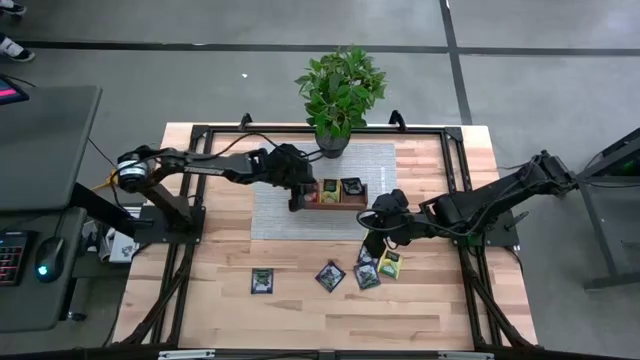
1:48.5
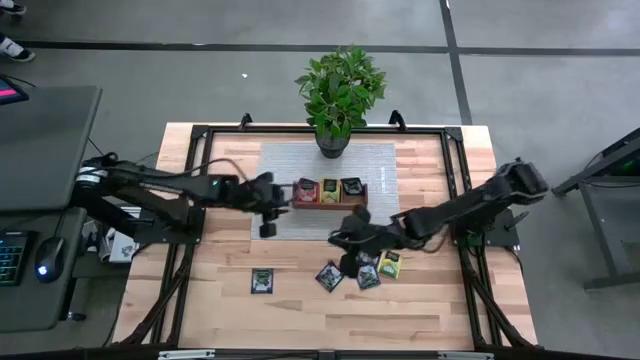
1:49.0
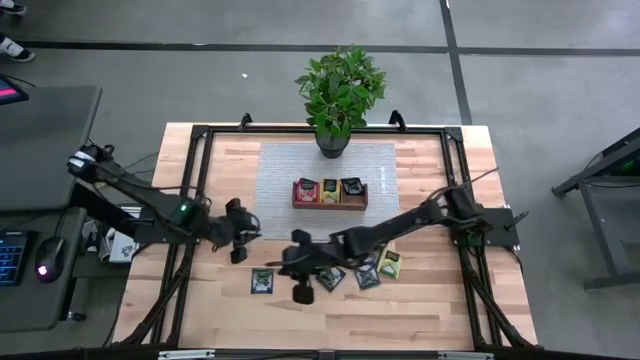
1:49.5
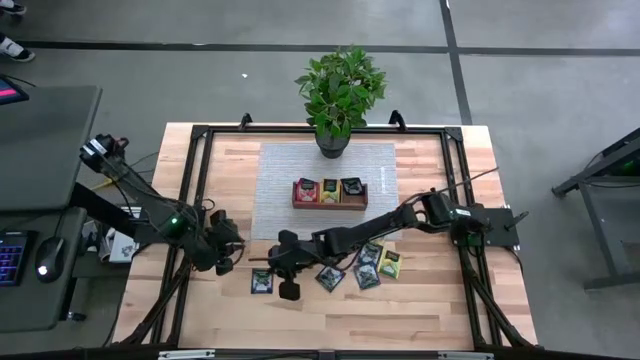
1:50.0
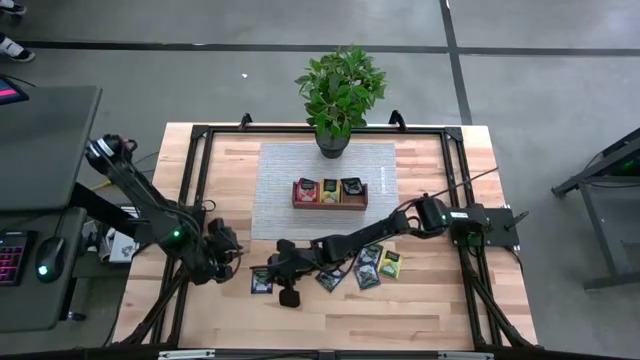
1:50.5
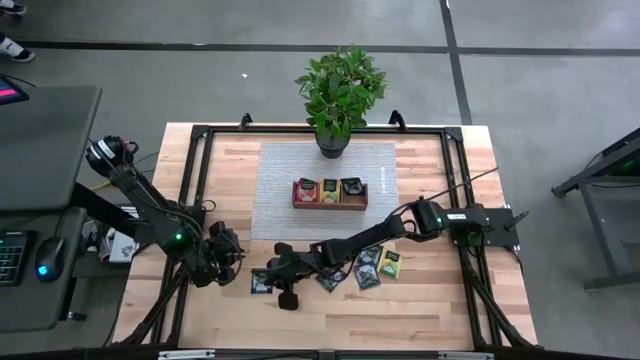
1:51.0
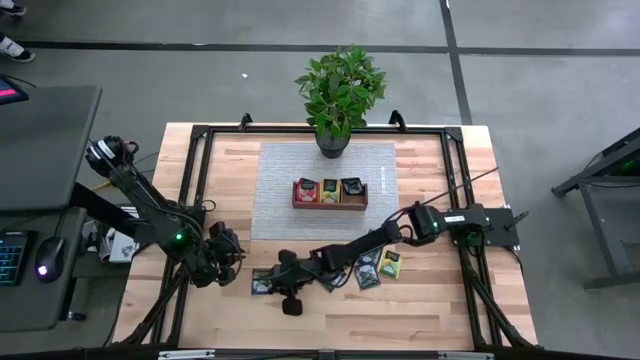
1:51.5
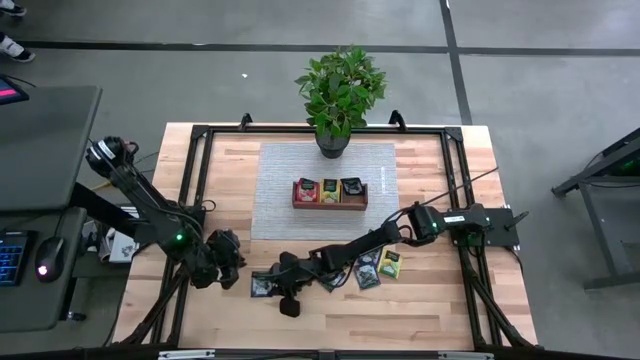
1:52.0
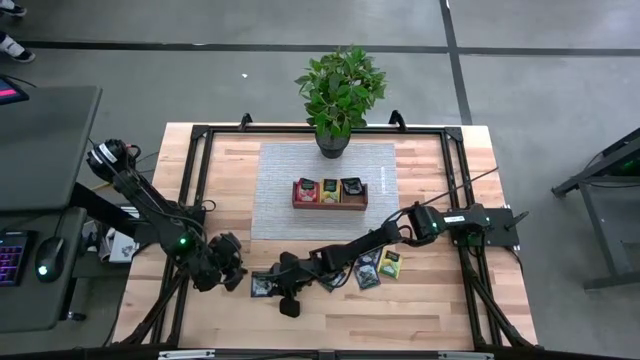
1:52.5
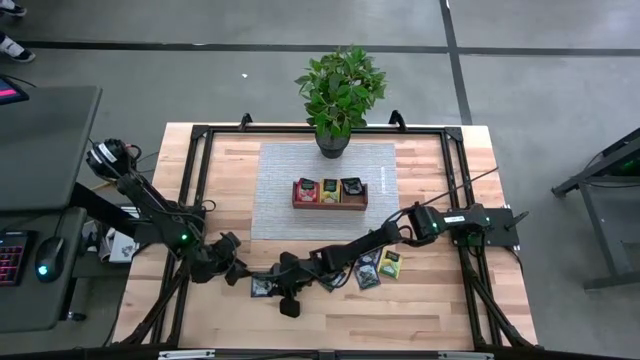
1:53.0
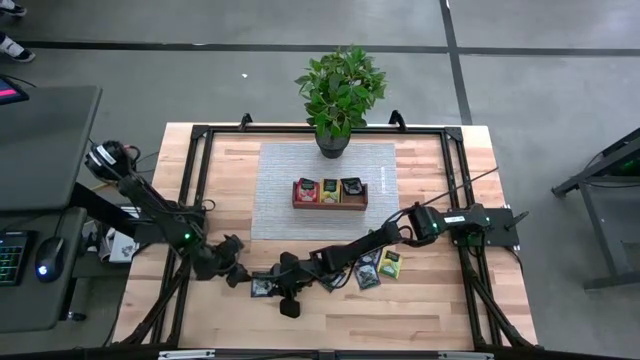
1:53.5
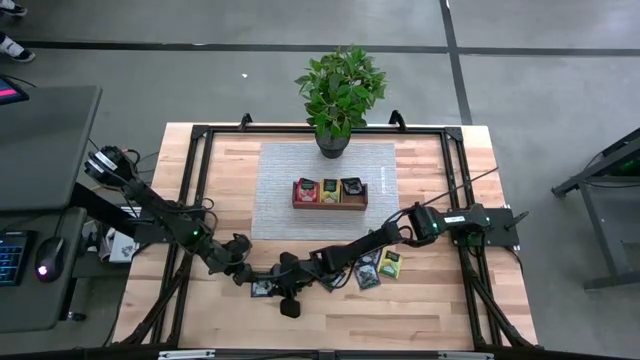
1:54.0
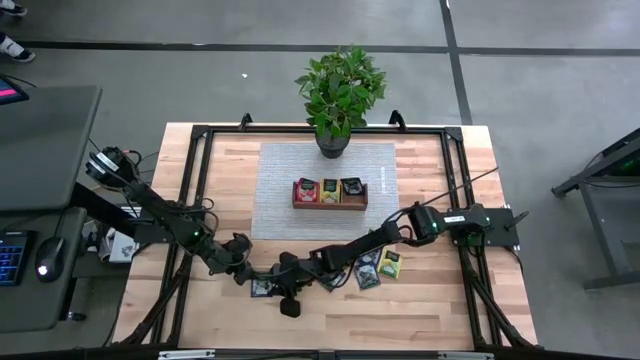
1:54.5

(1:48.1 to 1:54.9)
Task: Pick & Place Tea
Put the violet tea bag into the right section of the wooden organizer

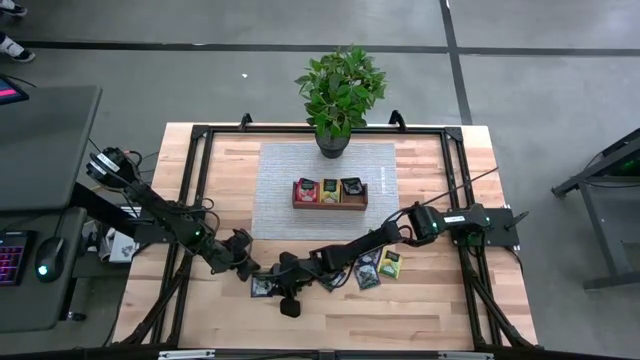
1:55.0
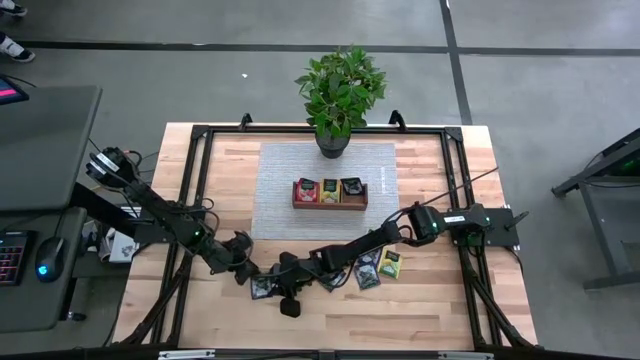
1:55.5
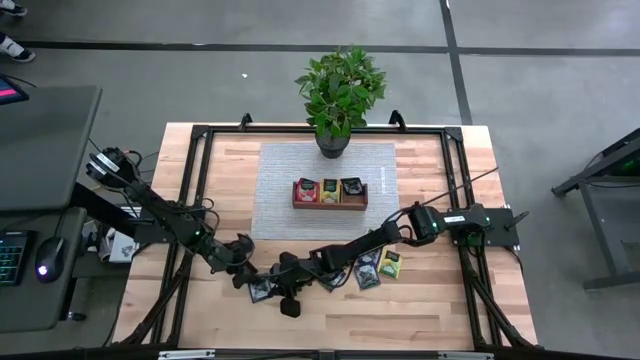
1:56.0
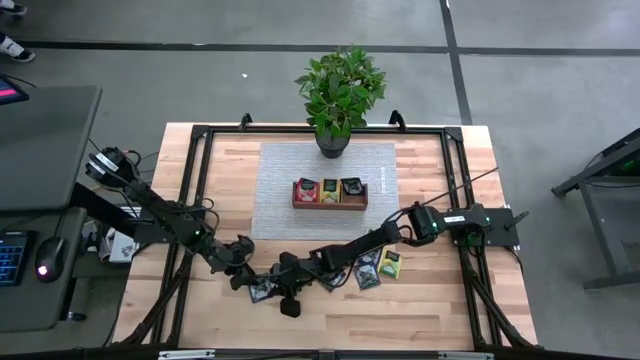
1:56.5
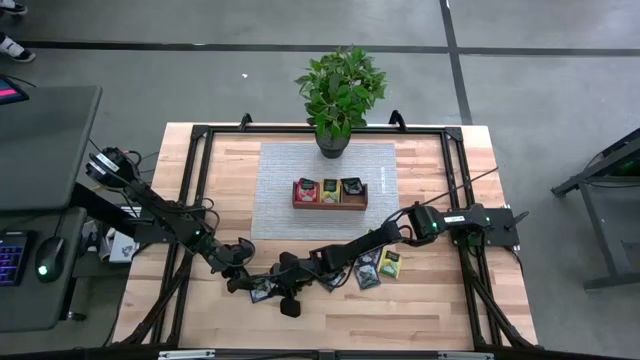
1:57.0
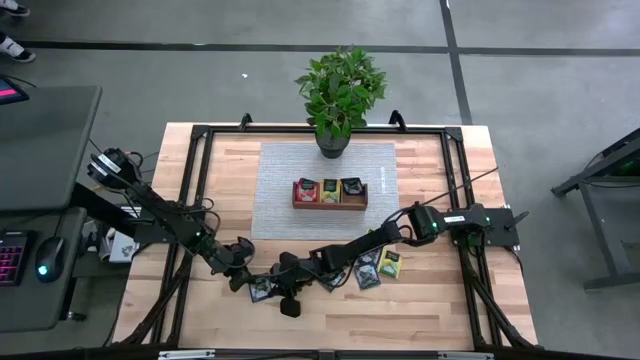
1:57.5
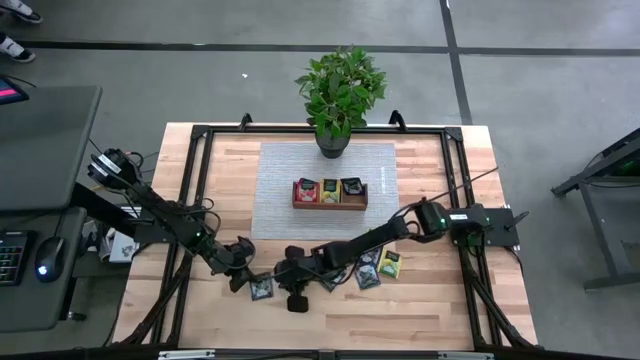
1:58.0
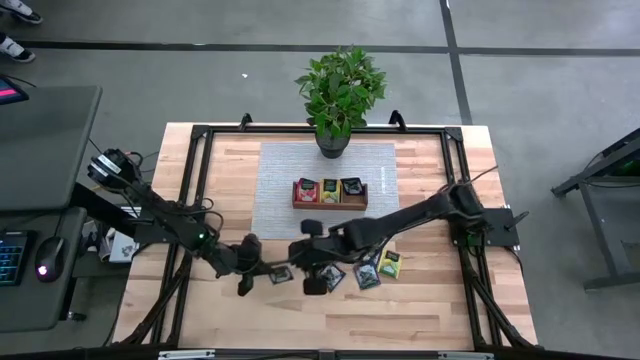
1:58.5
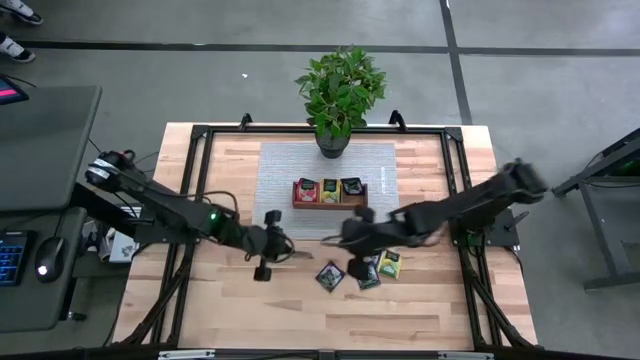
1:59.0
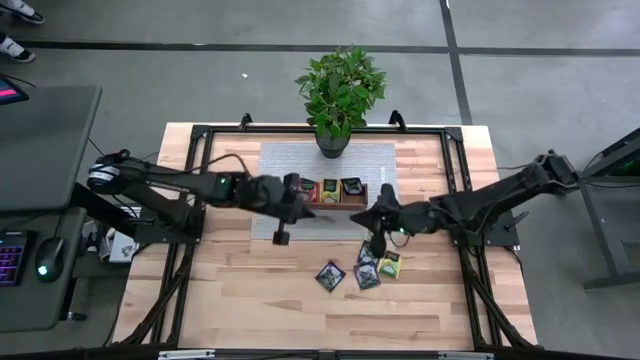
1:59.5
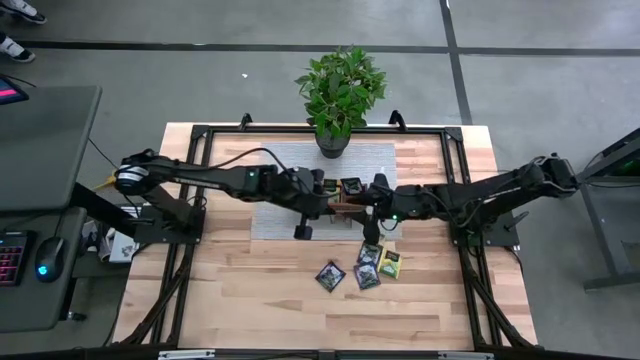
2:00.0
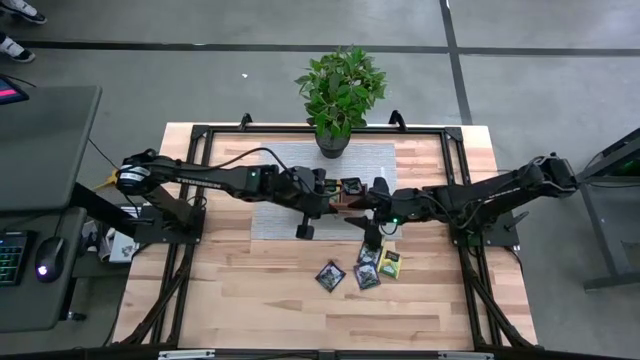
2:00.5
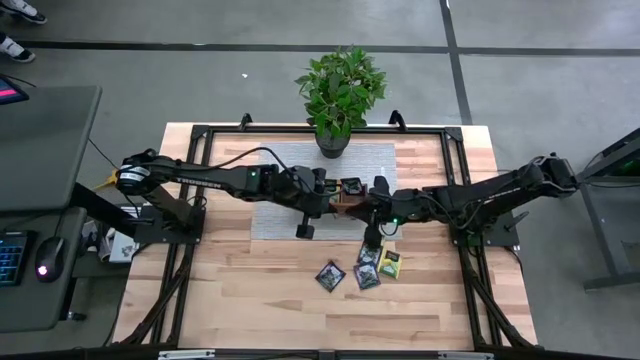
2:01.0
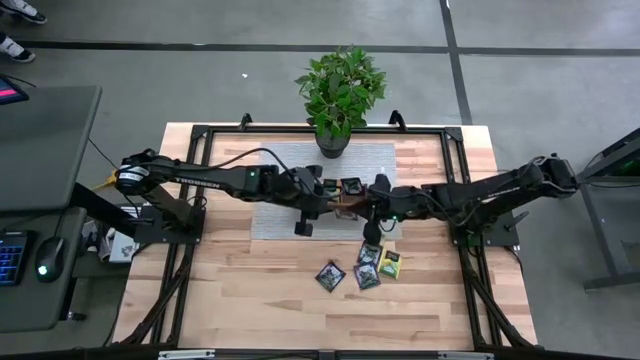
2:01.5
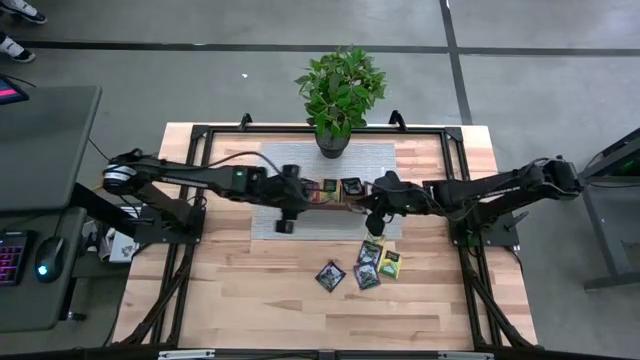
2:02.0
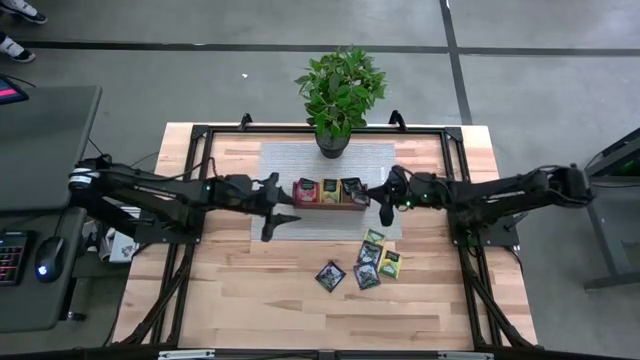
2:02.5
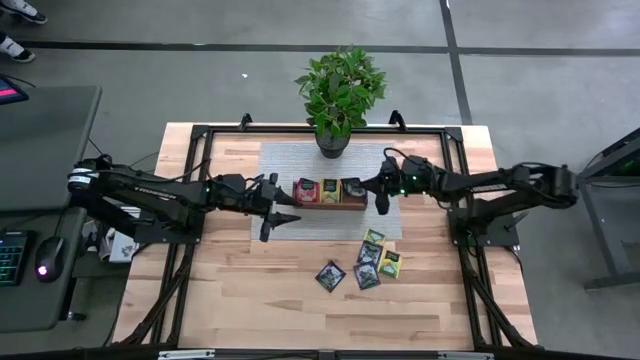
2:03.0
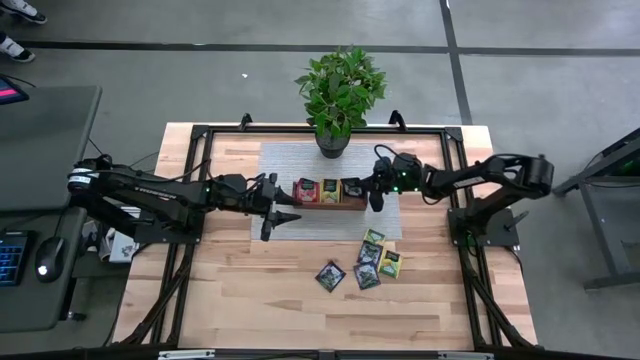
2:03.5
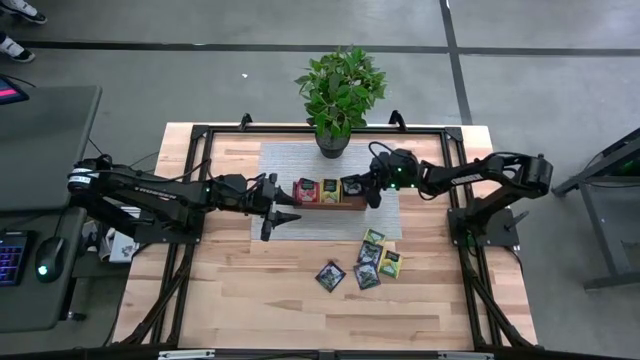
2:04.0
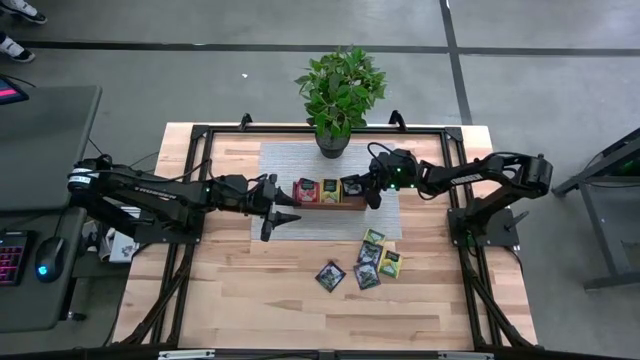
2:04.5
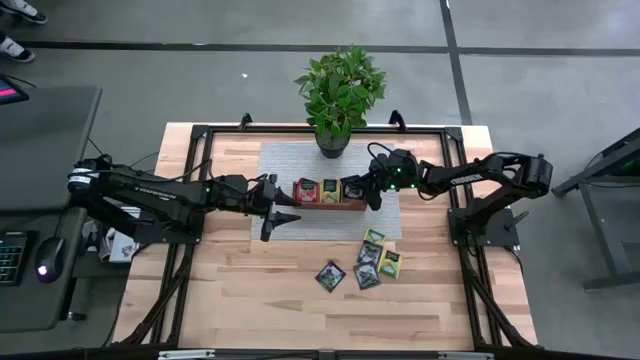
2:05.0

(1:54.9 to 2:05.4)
Put the violet tea bag into the right section of the wooden organizer

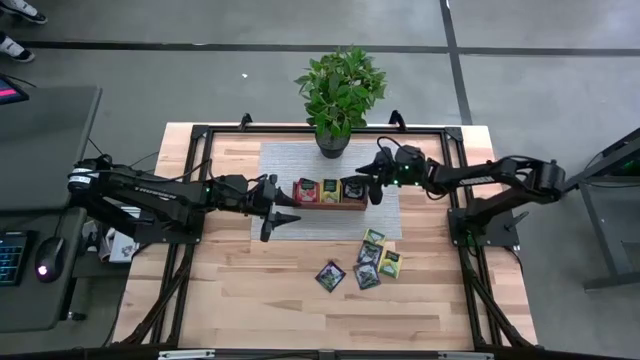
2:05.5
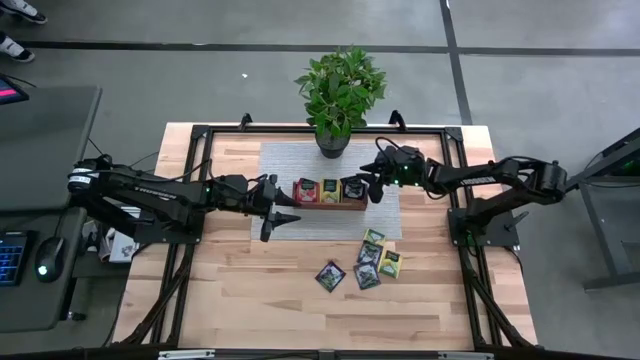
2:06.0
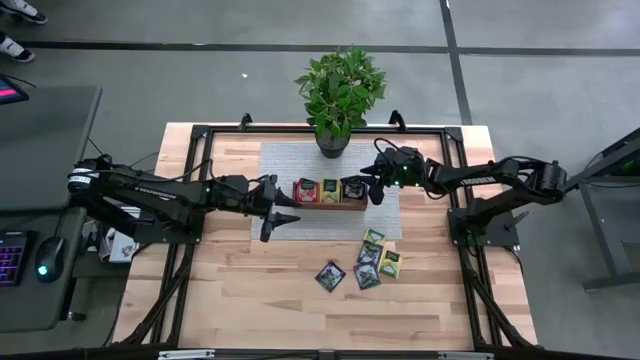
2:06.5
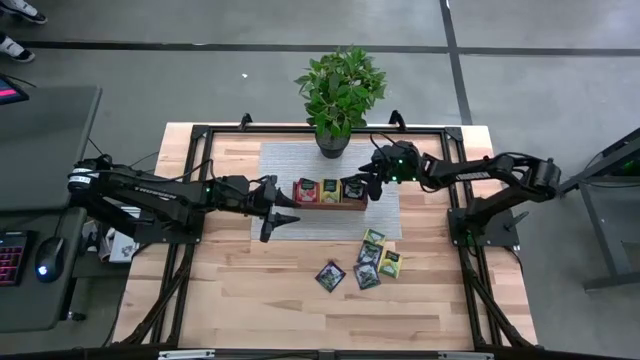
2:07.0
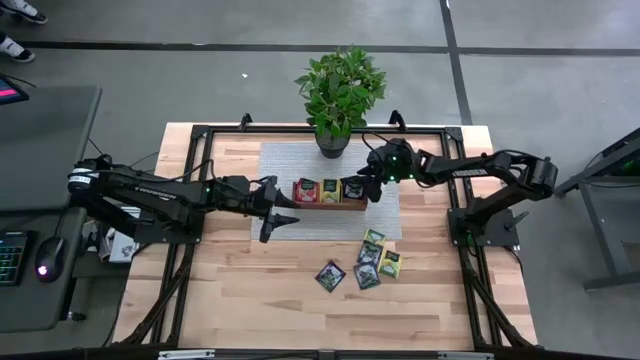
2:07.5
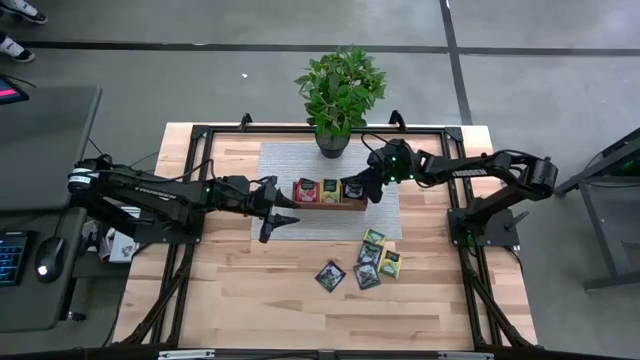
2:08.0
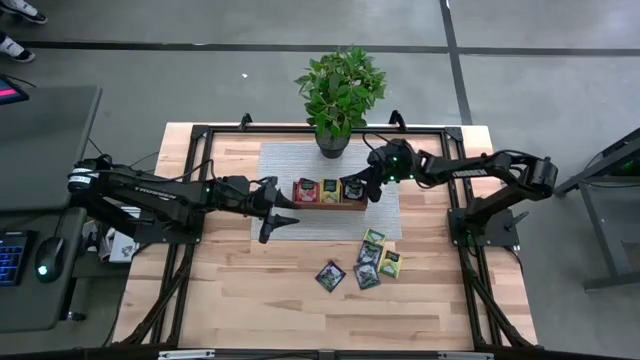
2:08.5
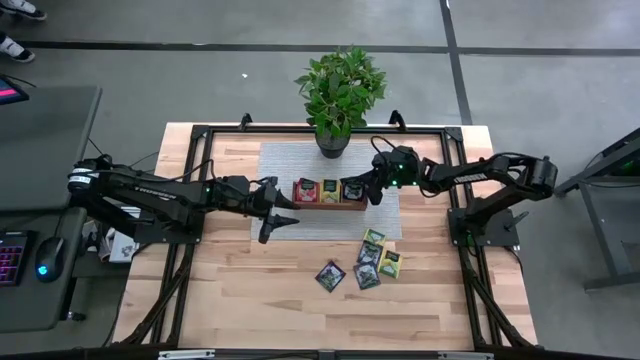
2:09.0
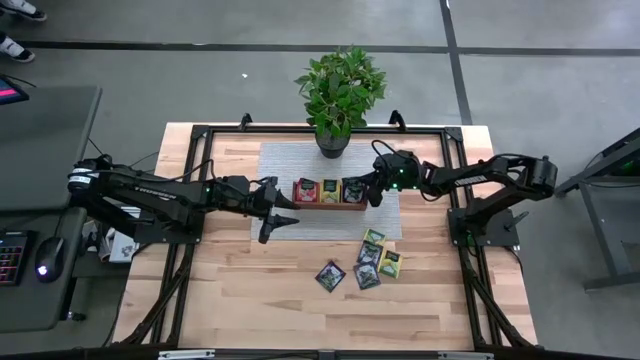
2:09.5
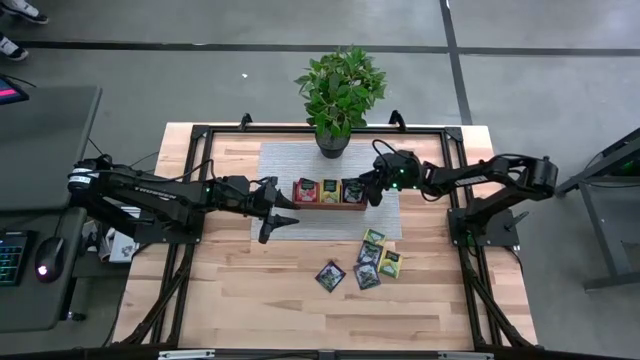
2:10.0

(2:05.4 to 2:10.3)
Adjust the violet tea bag in the right section of the wooden organizer
